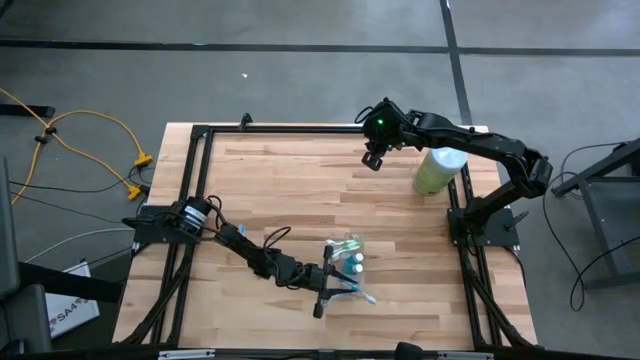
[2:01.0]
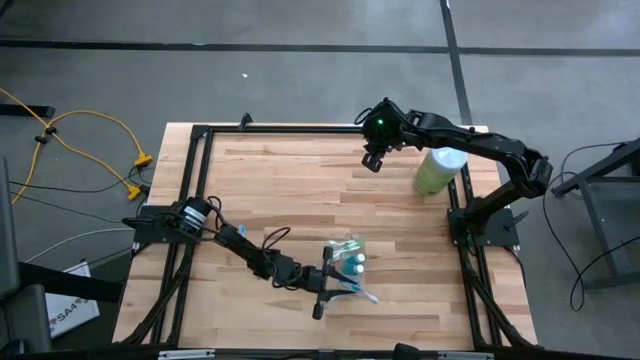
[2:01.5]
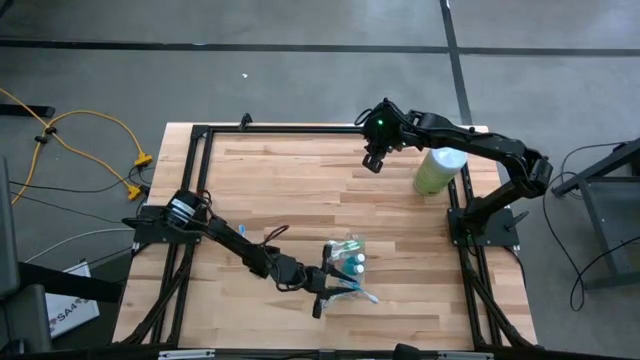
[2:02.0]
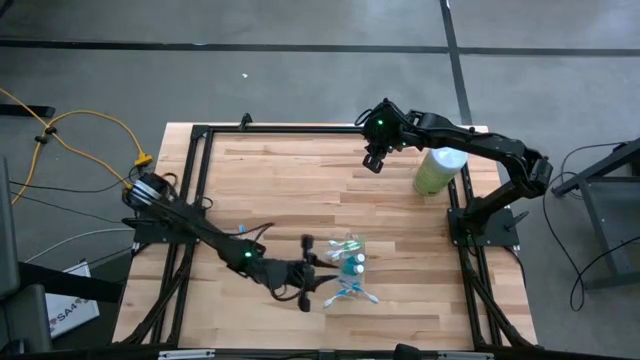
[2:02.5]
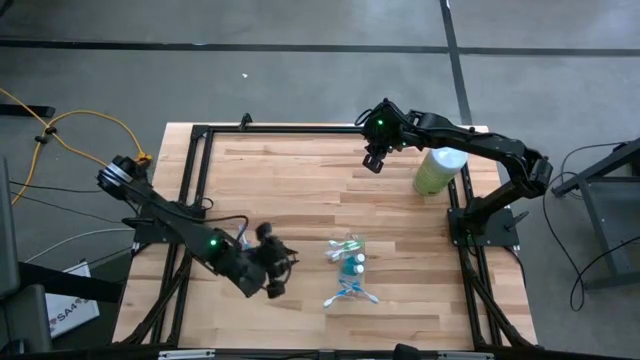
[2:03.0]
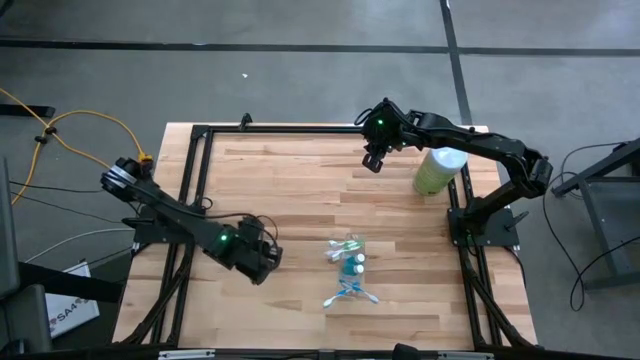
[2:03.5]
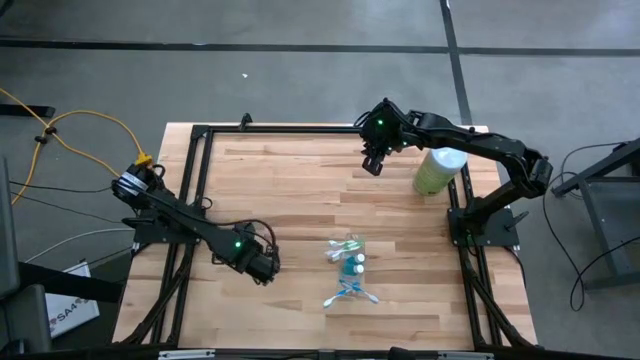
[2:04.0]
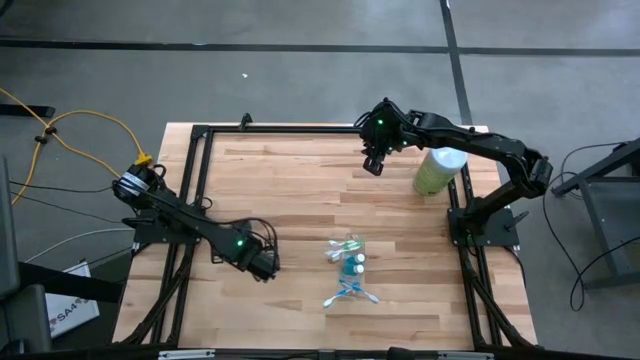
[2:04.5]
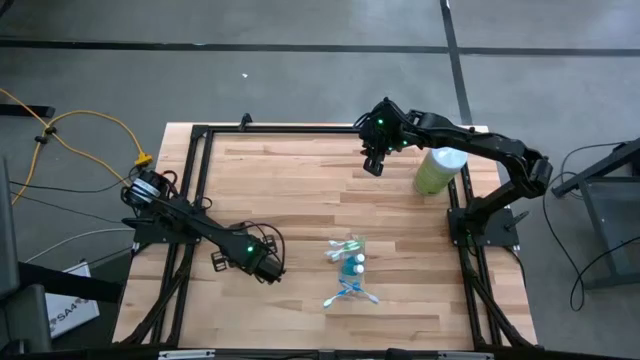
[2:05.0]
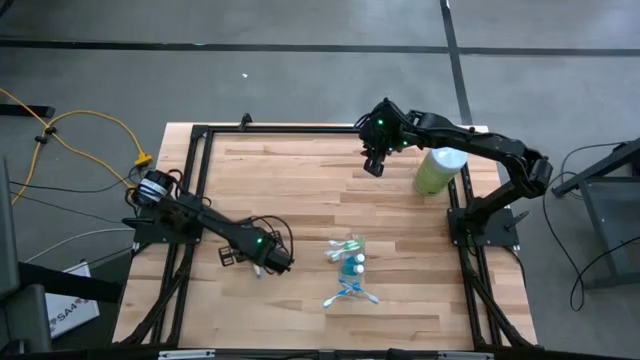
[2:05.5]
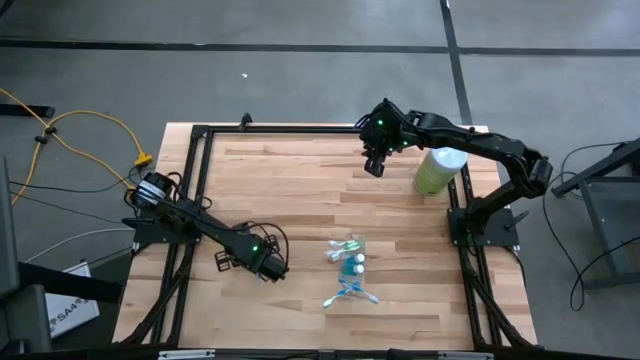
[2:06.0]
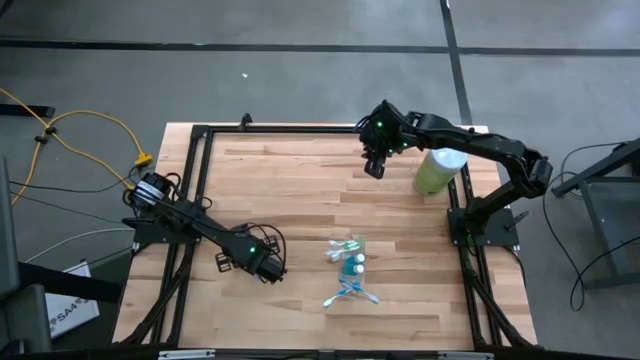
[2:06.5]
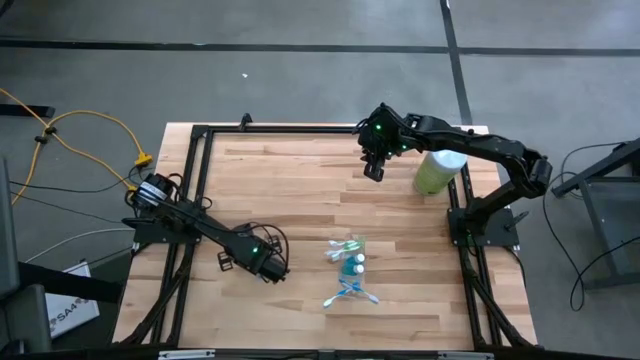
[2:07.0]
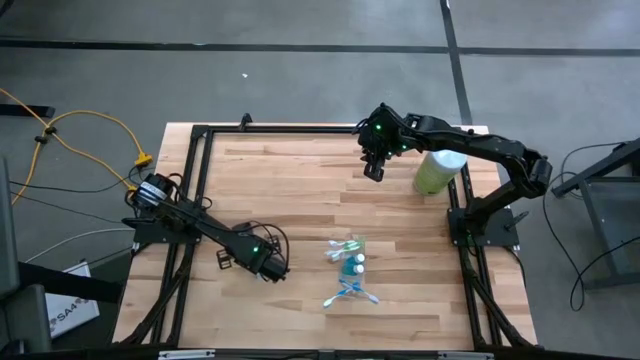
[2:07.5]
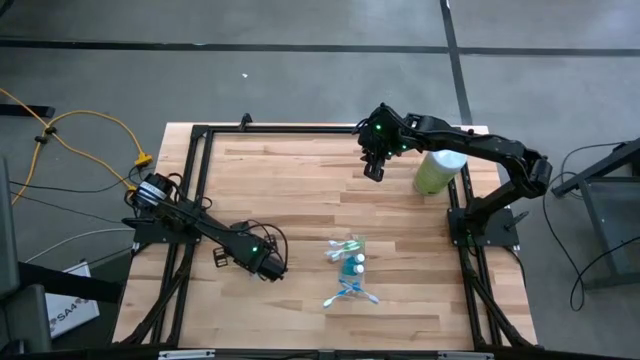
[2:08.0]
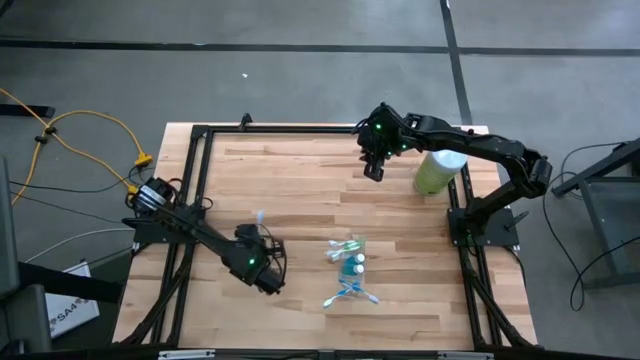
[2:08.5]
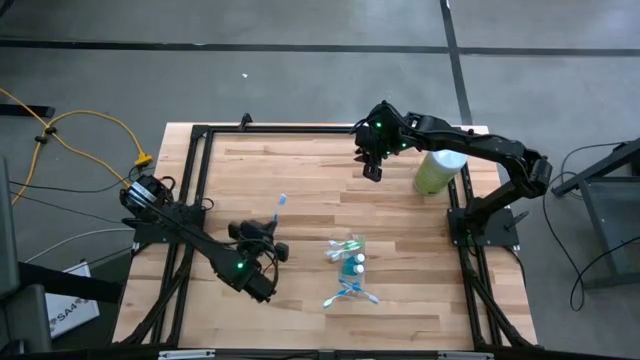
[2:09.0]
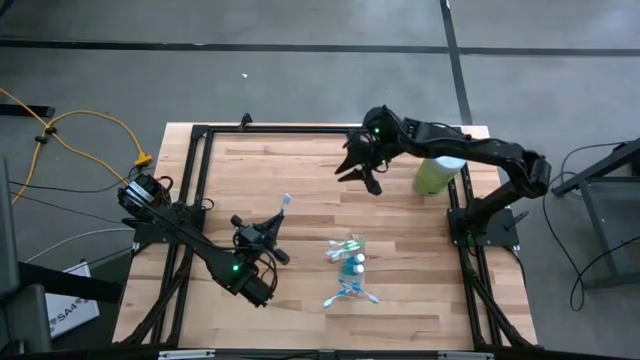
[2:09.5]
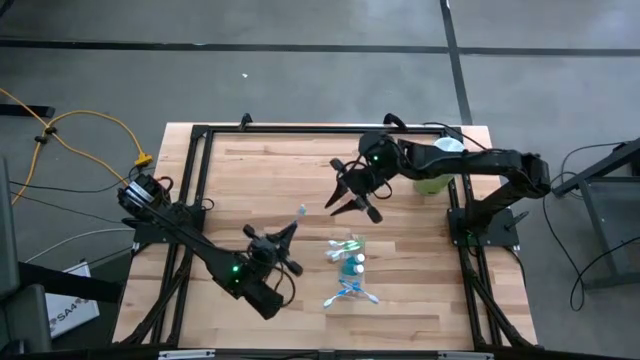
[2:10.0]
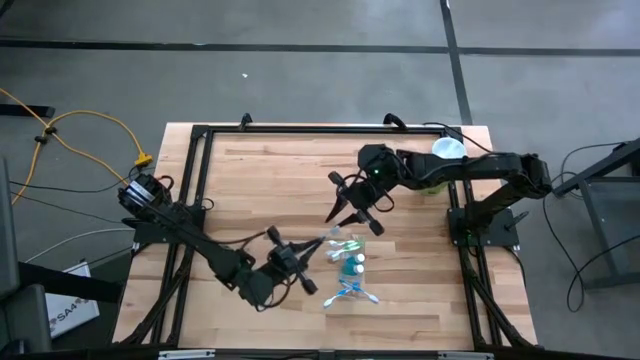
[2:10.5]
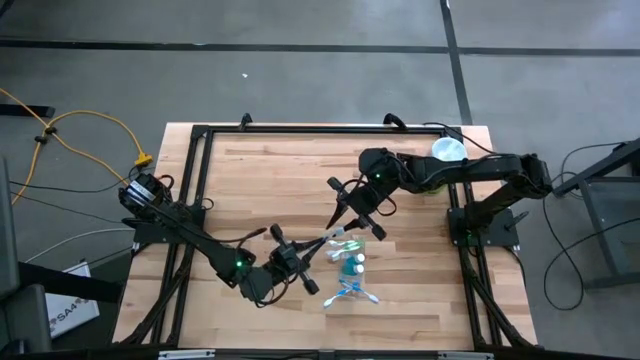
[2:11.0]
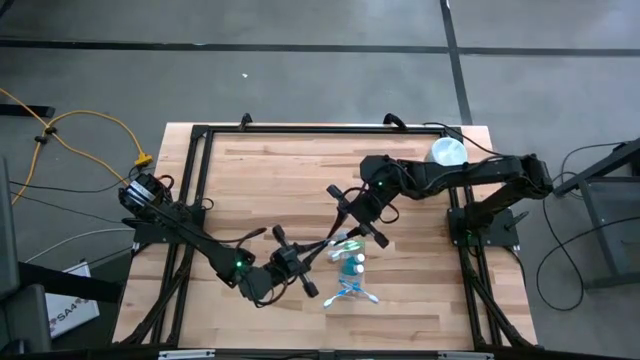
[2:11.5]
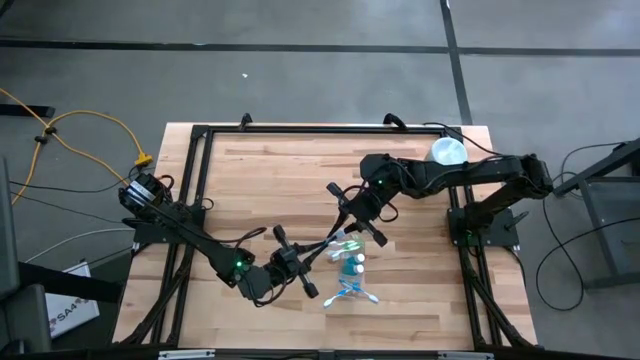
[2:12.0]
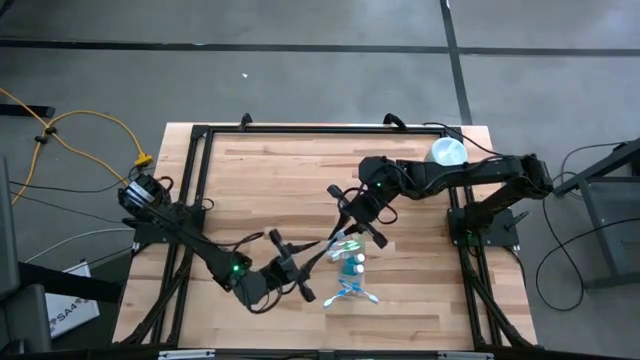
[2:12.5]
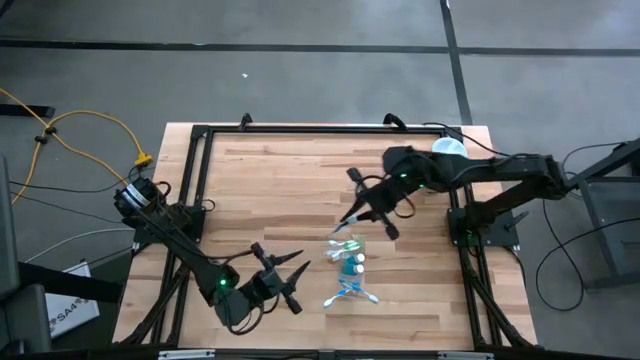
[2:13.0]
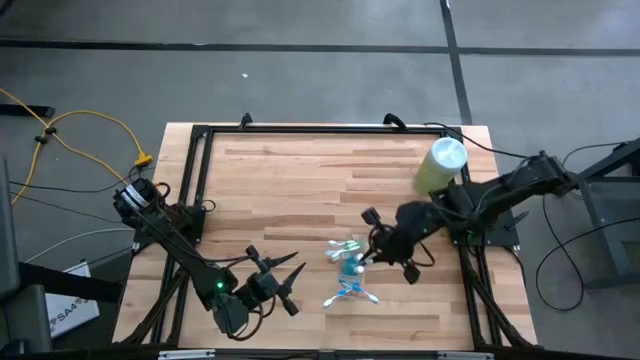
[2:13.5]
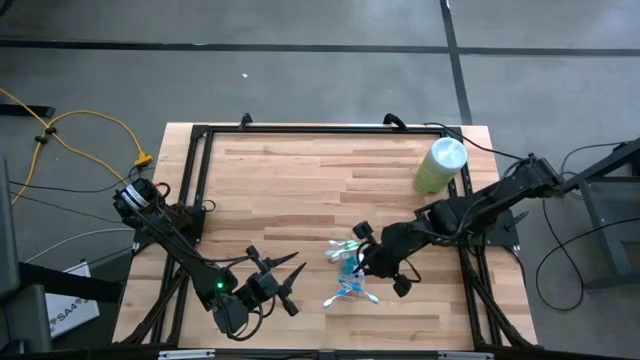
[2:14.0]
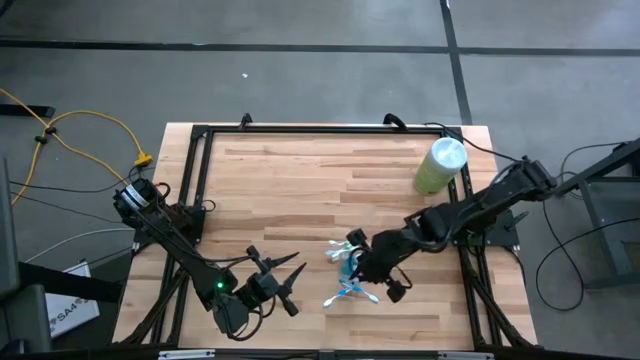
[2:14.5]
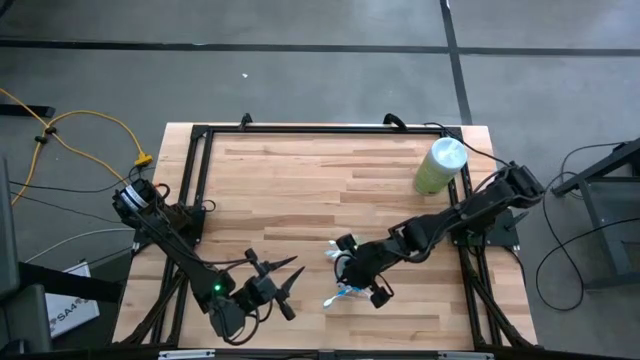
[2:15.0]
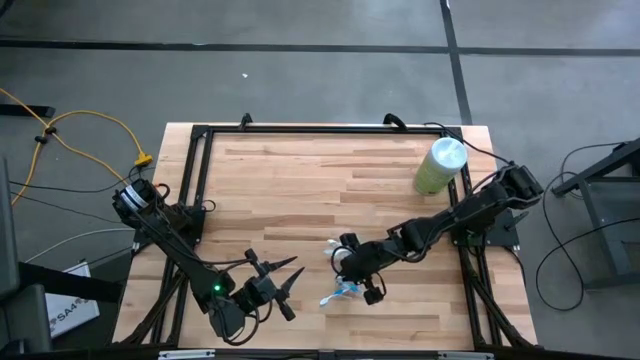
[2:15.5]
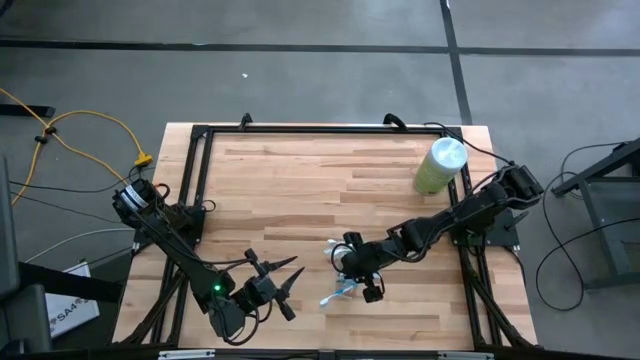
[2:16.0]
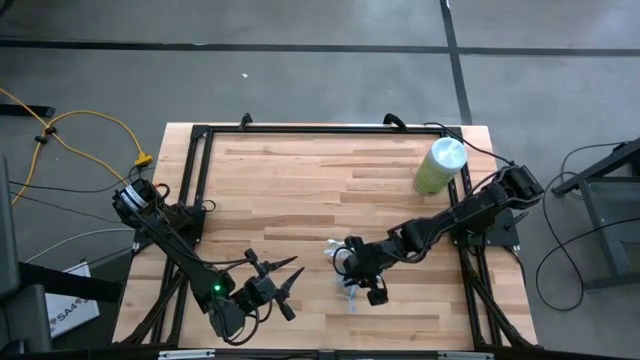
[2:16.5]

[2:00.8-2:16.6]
Task: Pick & Place toothbrushing station
Put the blue toothbrush into the transparent organizer
